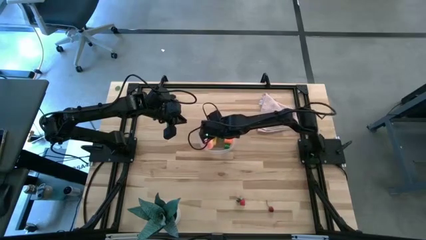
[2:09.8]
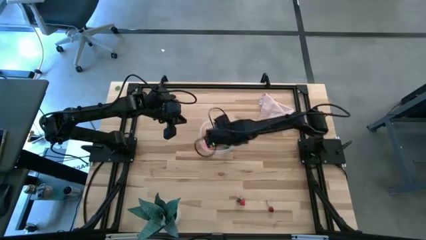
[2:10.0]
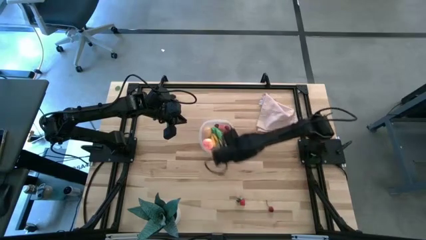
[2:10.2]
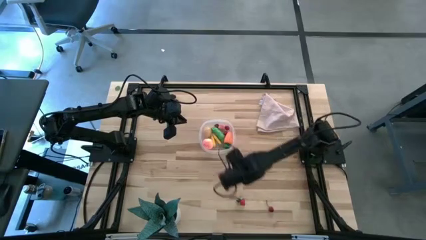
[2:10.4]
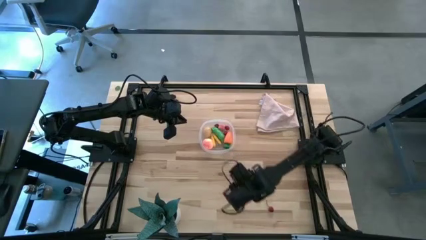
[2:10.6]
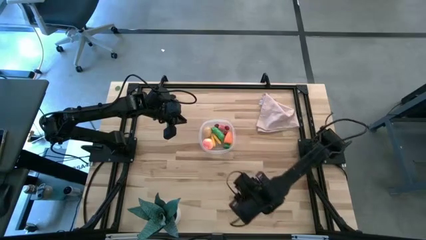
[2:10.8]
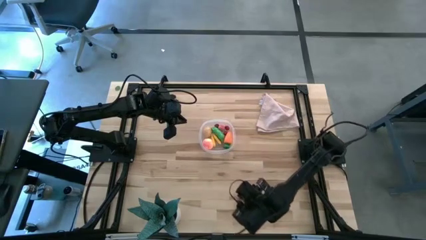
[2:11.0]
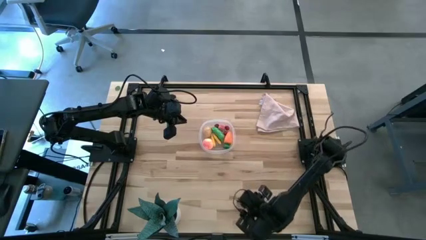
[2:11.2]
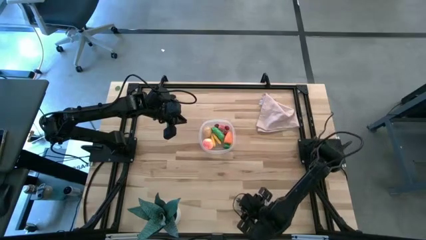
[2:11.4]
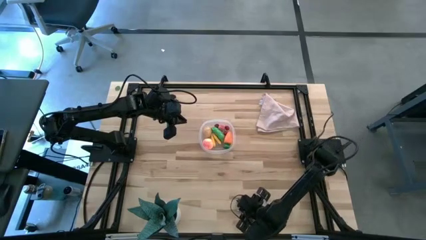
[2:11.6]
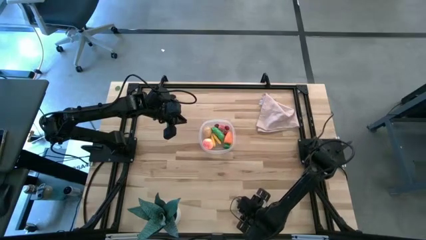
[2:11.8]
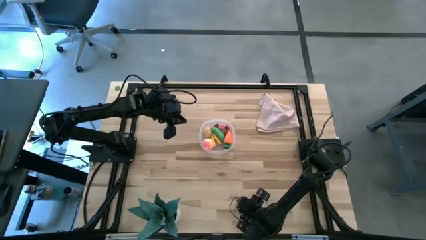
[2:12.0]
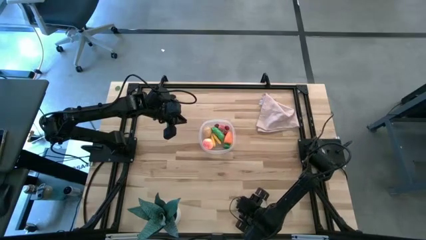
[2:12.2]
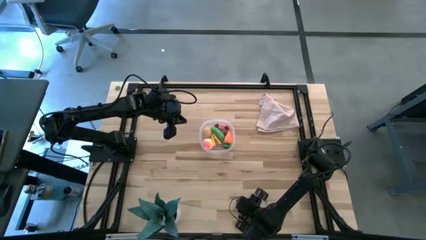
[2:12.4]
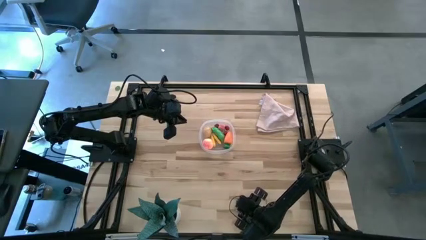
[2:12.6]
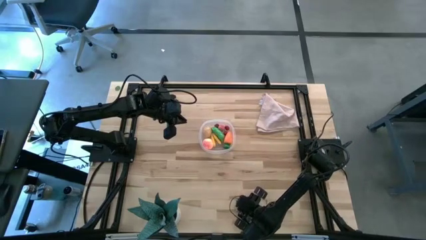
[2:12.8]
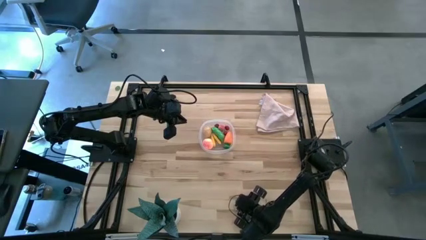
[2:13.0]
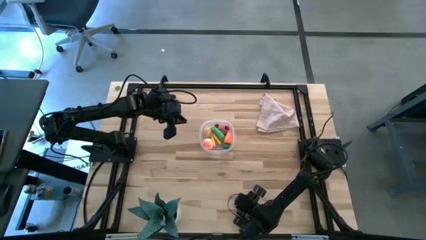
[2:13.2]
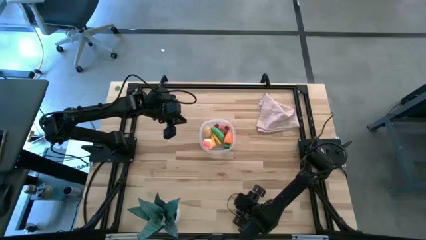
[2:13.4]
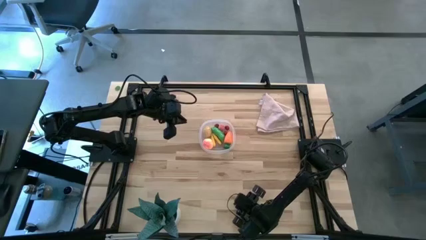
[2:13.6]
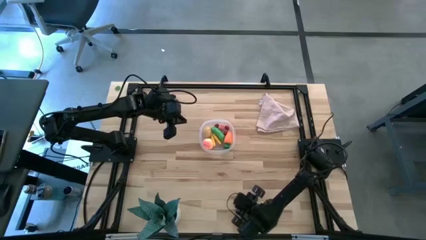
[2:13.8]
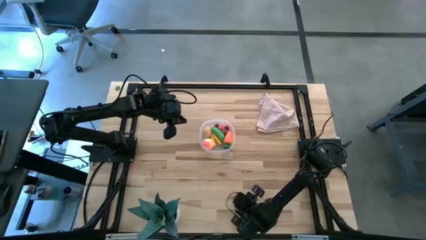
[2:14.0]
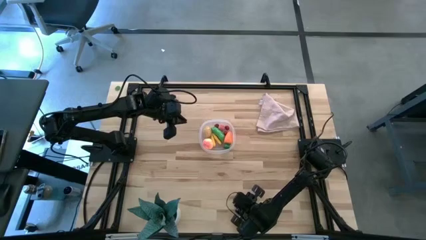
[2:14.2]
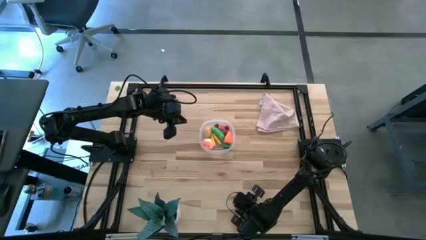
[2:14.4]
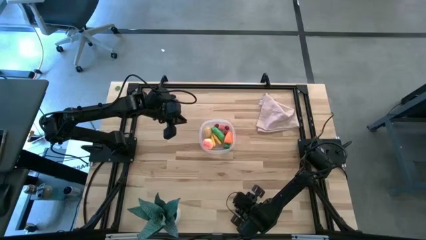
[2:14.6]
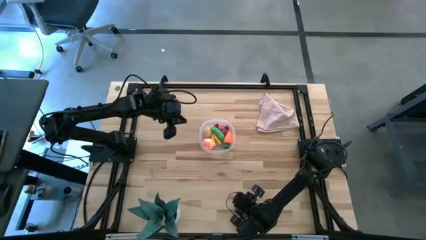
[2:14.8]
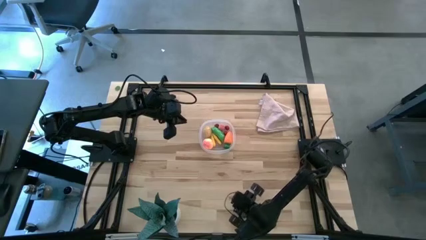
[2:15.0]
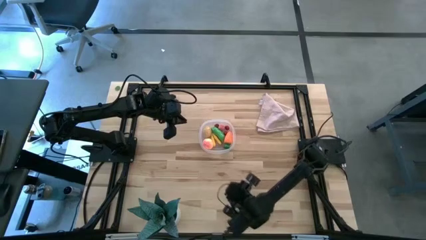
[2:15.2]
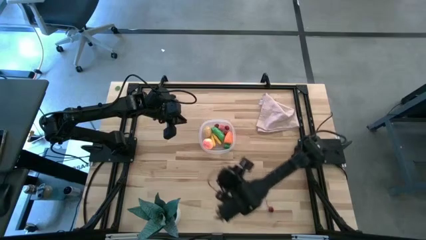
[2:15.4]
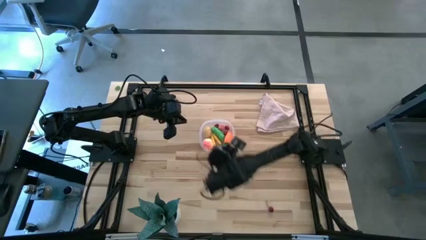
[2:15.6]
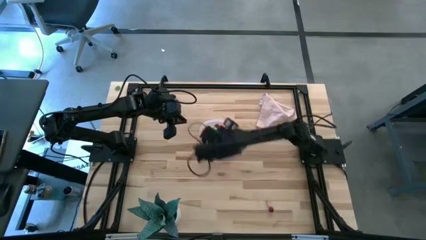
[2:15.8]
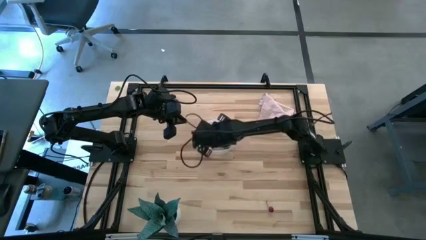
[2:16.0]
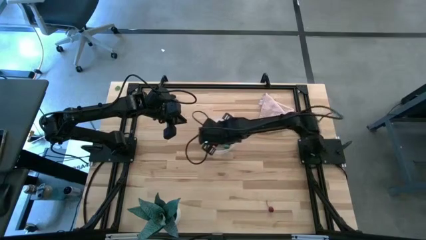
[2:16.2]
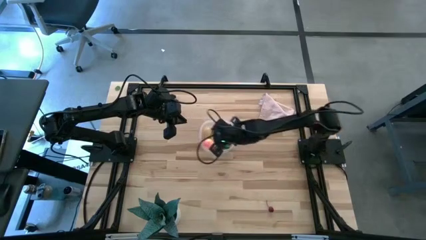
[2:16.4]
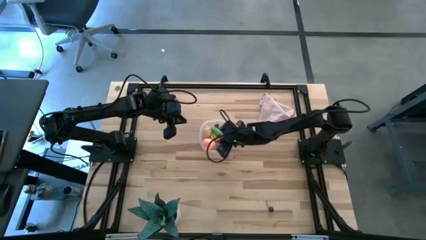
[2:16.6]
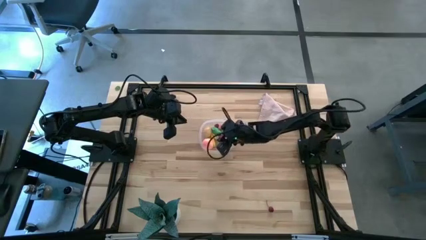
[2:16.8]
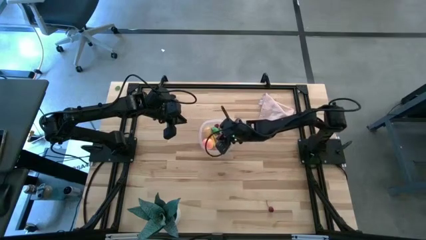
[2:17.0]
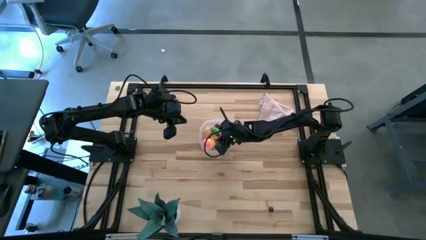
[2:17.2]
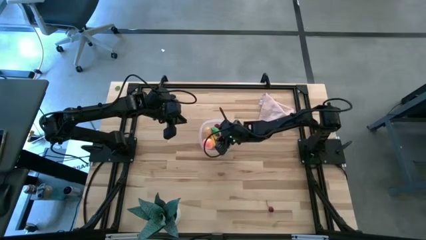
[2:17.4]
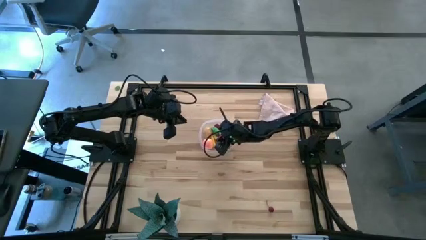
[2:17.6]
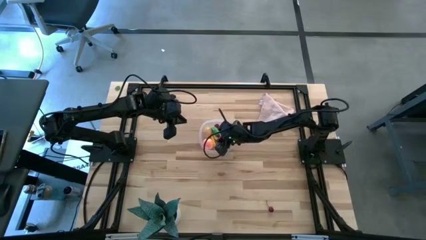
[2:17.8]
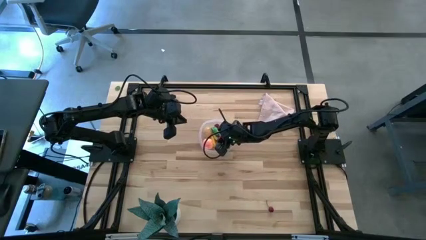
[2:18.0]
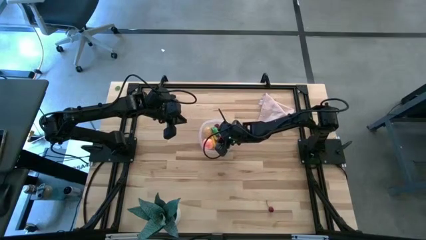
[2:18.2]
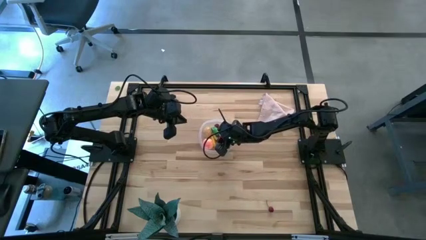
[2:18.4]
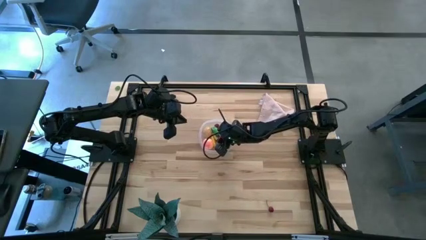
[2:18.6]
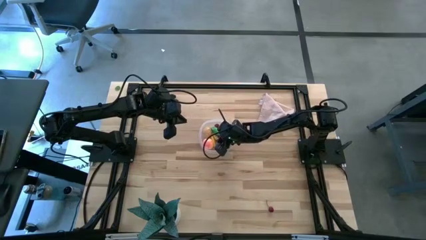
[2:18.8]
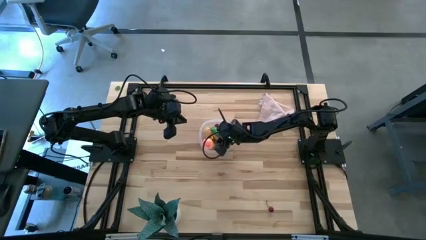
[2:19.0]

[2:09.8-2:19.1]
Task: Pick and placing Produce into tupperware
Put the red strawberry into the transparent bin

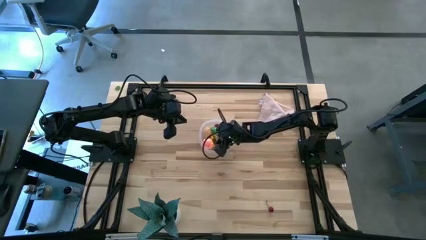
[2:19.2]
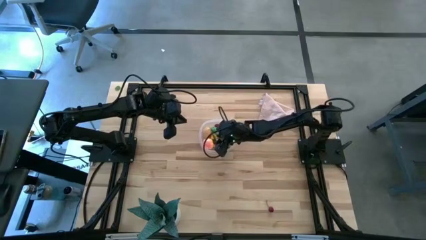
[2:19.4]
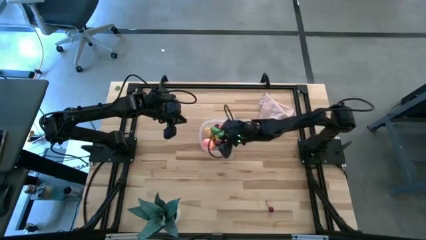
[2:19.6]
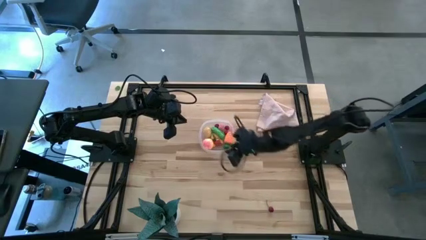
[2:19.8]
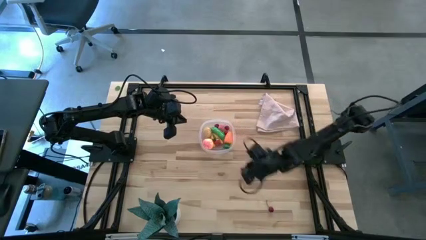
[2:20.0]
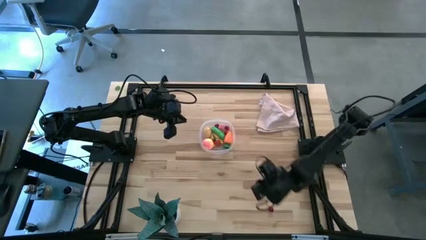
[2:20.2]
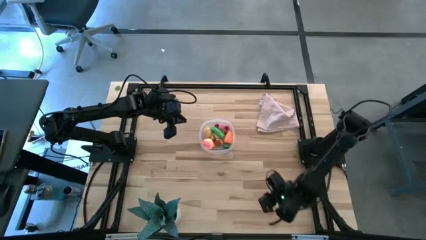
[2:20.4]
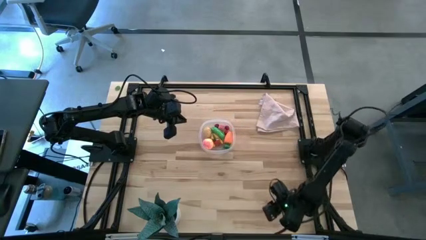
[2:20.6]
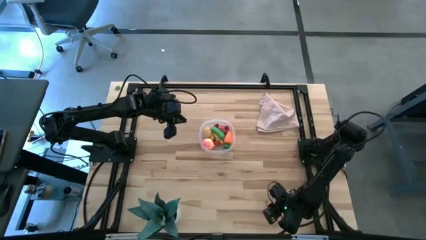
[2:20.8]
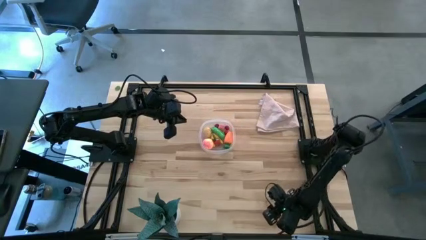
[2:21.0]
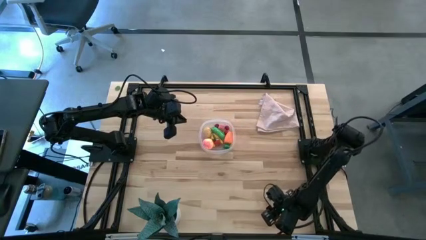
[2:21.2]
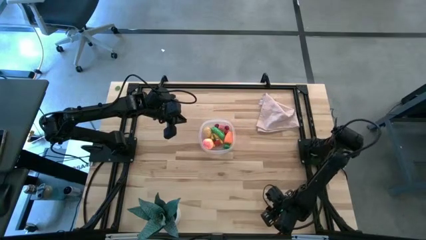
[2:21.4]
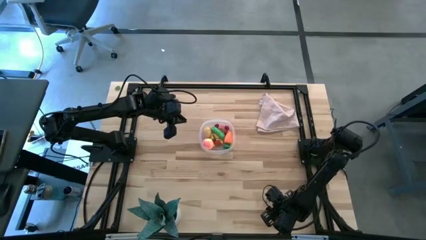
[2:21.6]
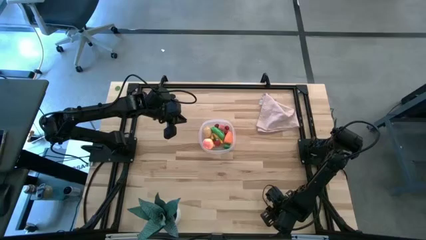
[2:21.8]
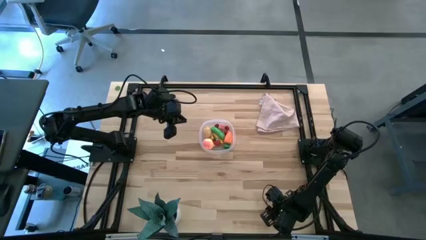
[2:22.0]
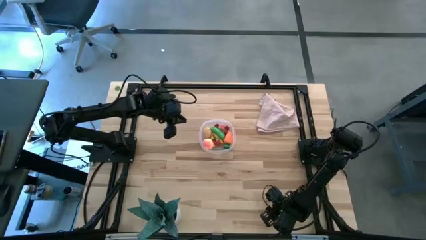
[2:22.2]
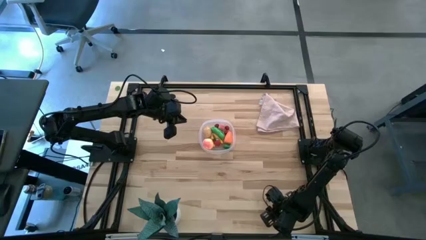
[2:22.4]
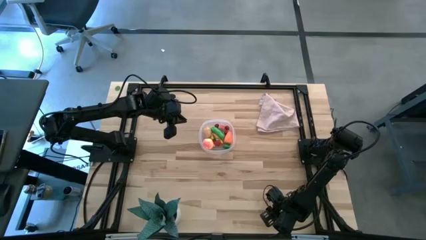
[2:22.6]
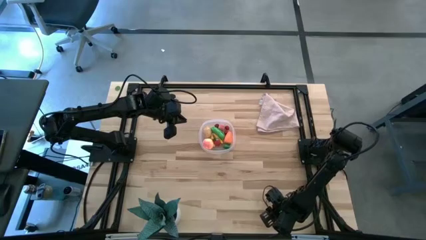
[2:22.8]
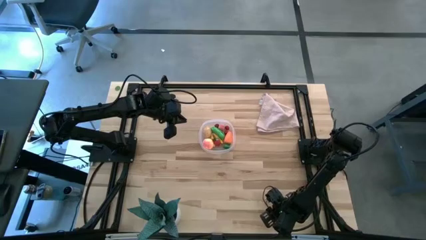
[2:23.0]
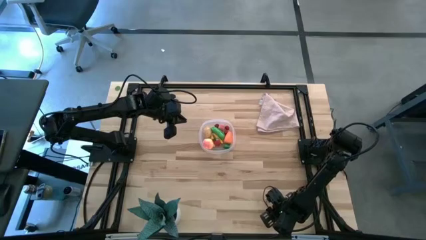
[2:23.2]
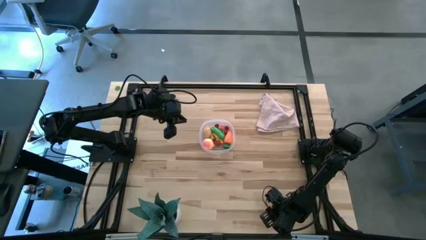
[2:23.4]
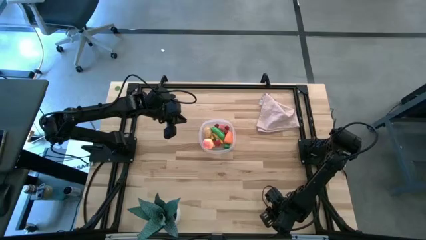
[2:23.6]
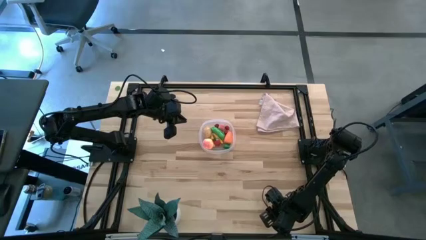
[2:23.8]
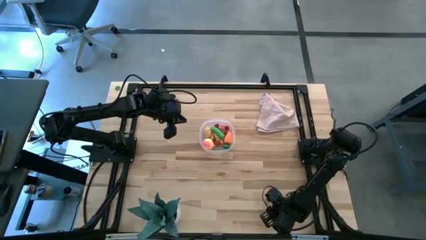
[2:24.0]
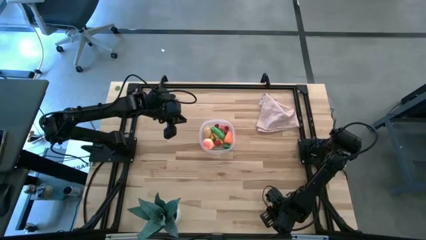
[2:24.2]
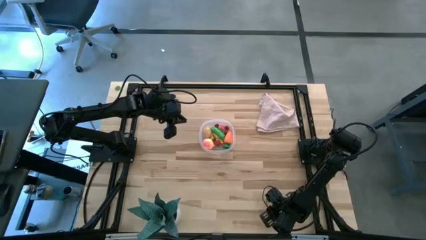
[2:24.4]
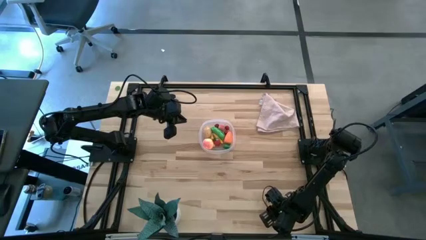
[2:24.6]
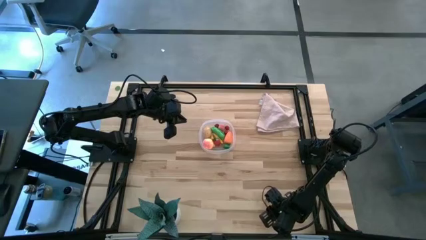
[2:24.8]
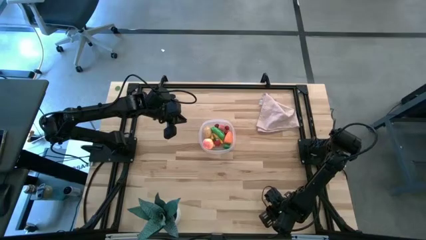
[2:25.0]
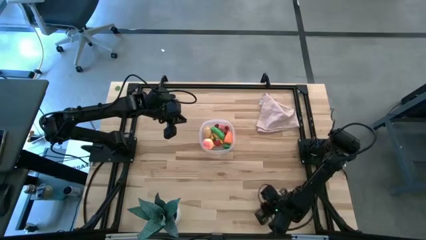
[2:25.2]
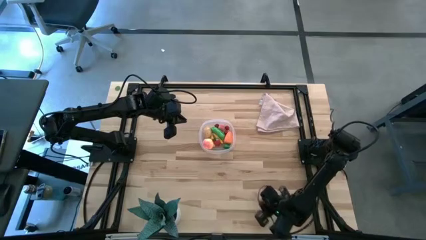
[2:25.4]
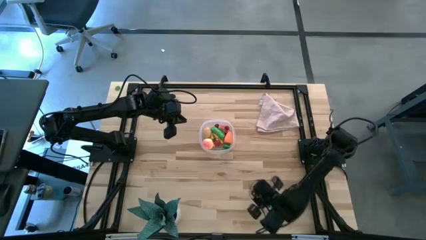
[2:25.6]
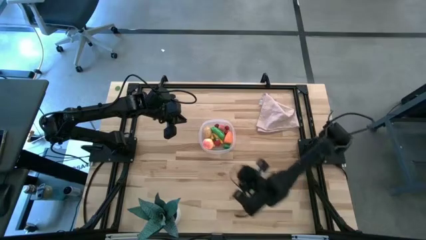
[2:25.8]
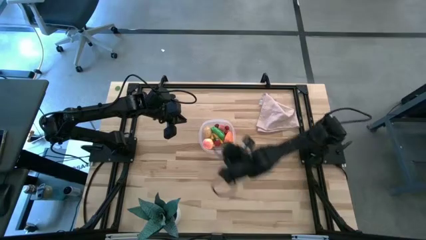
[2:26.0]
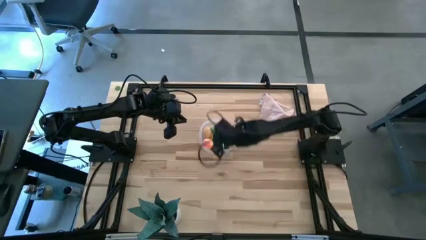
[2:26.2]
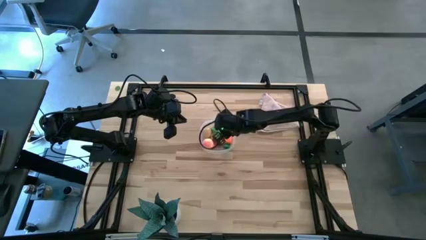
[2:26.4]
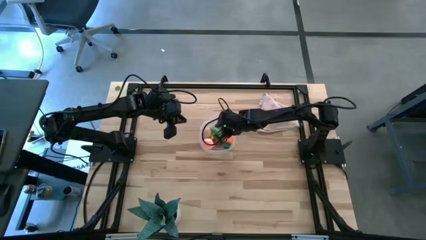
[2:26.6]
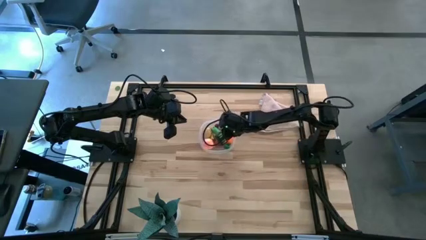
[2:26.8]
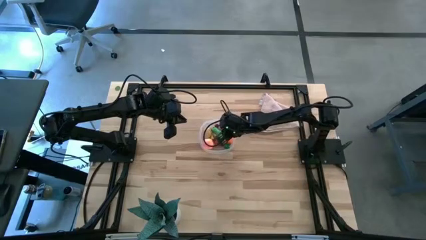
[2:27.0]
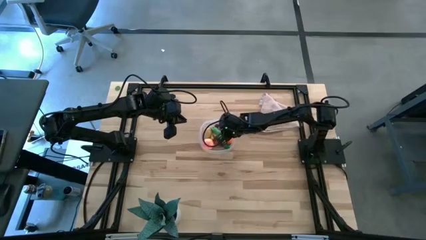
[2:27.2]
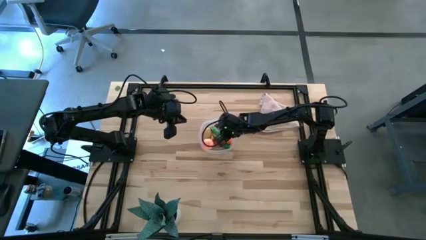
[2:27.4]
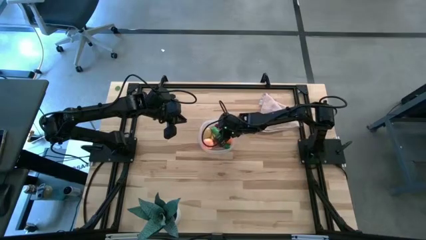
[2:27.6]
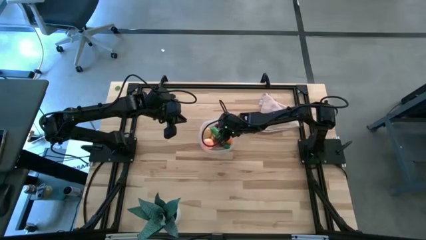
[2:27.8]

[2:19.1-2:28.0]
Put the red cherry into the transparent bin
